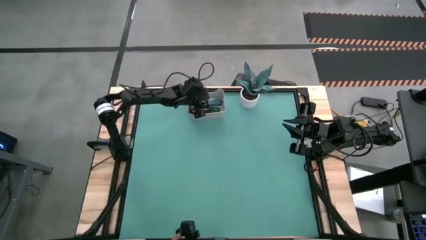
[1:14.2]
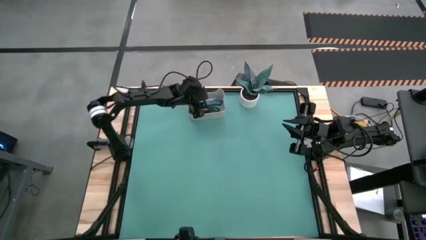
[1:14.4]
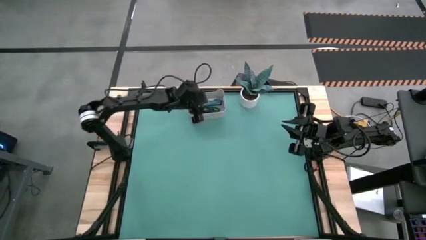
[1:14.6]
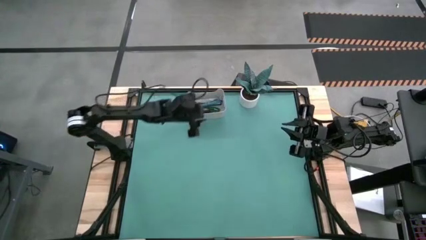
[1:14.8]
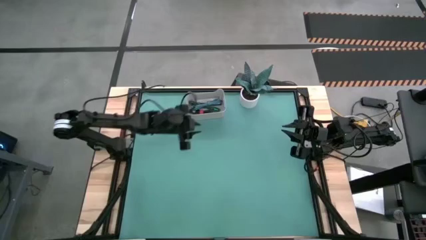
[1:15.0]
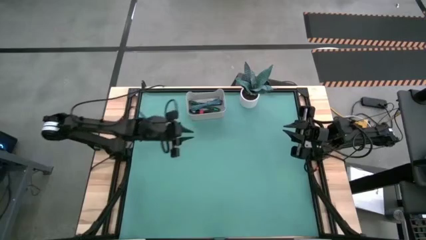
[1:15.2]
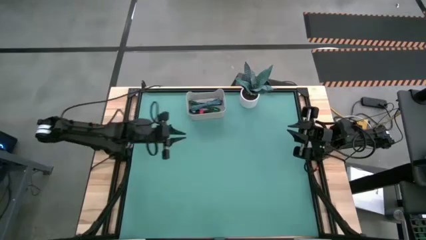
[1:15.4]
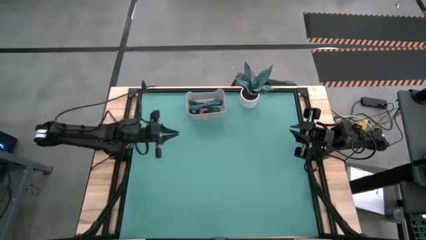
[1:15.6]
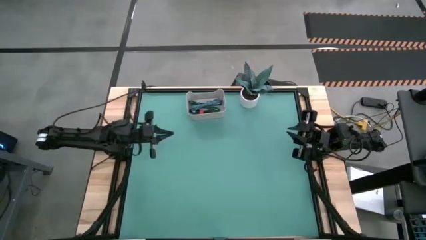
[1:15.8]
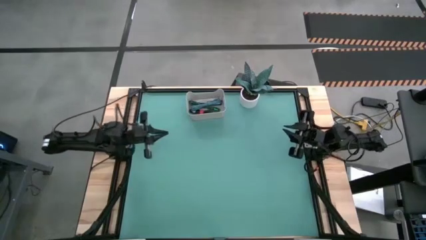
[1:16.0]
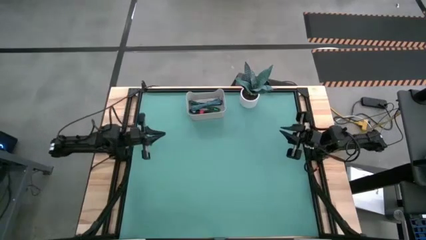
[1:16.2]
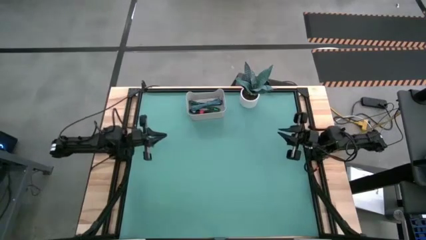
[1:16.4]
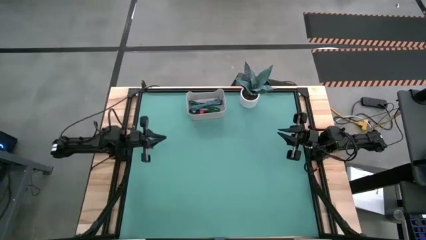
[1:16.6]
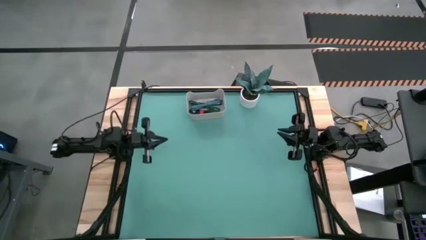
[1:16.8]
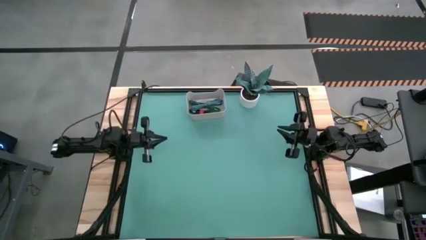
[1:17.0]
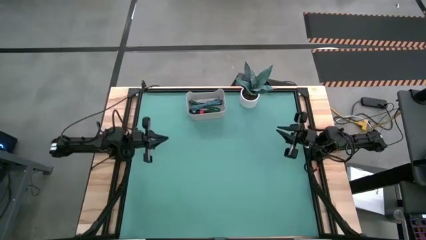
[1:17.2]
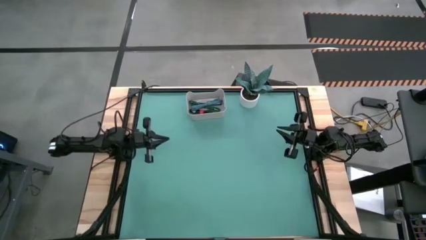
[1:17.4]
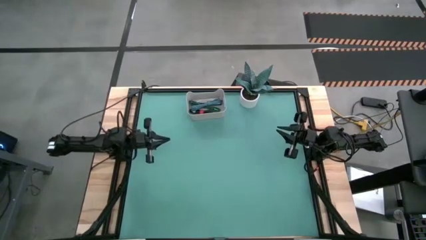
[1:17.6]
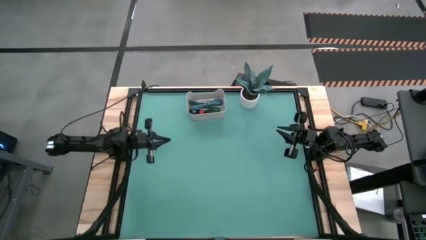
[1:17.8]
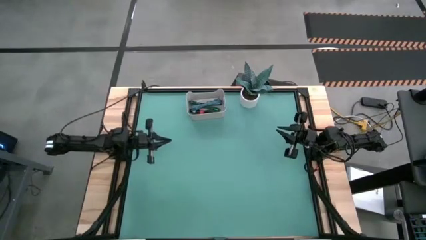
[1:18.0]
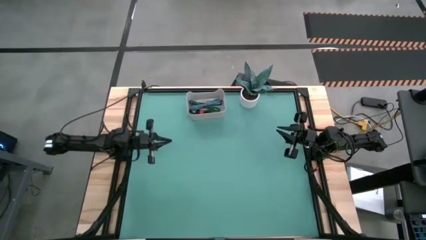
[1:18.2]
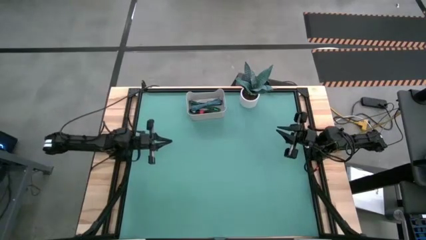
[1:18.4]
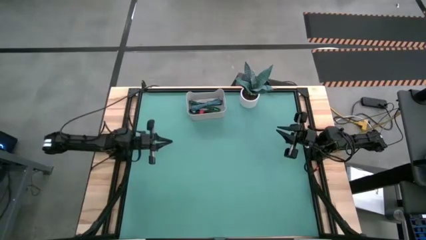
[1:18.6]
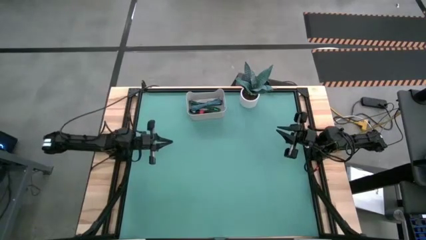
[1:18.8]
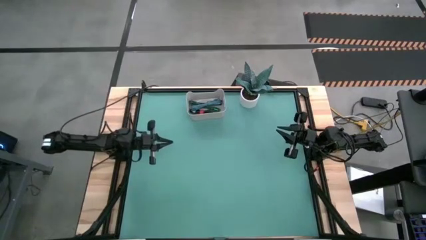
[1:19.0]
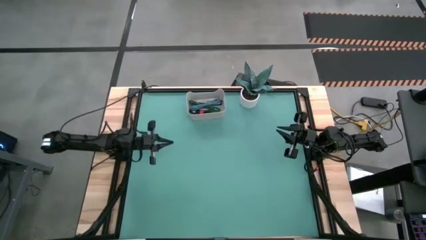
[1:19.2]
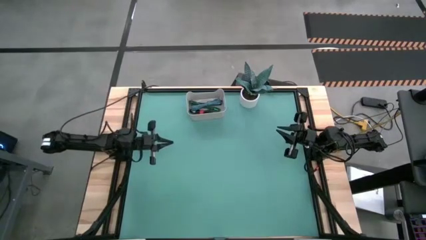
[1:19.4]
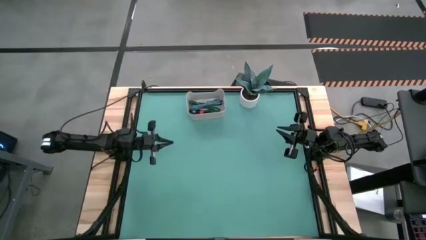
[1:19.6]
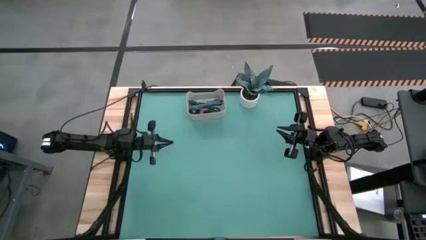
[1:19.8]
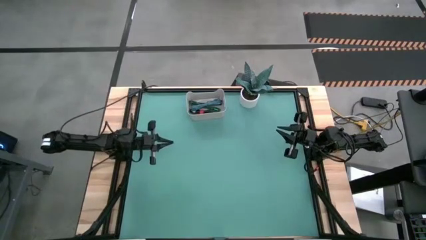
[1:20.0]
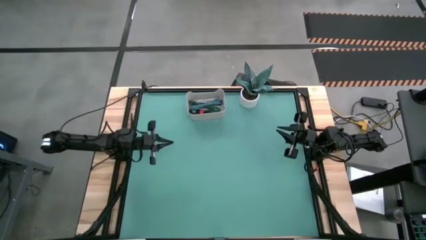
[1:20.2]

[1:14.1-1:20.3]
Task: Pick and place USB-C Cables
Return to Home Position

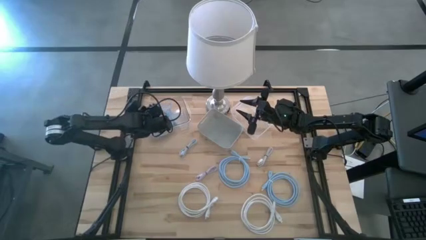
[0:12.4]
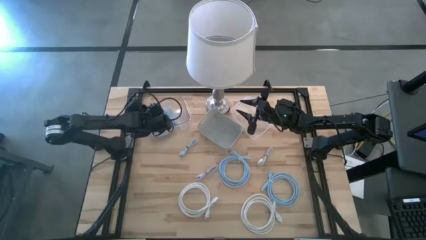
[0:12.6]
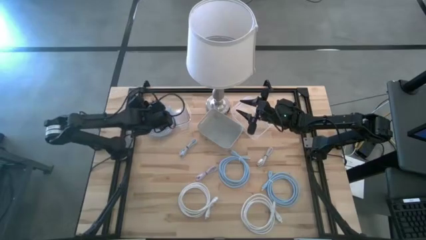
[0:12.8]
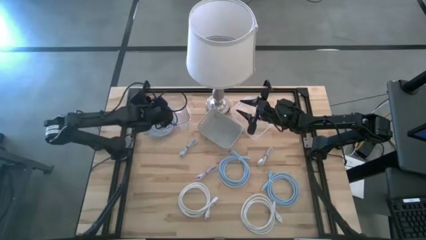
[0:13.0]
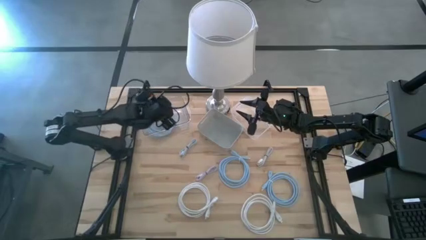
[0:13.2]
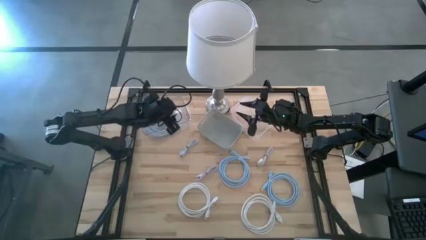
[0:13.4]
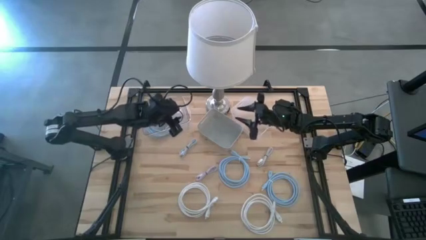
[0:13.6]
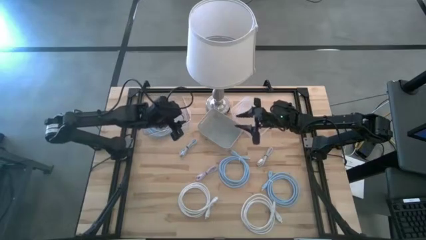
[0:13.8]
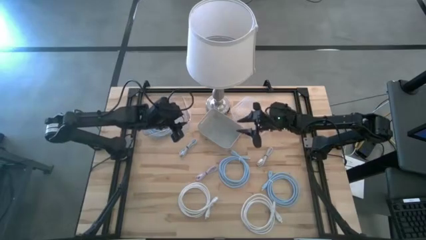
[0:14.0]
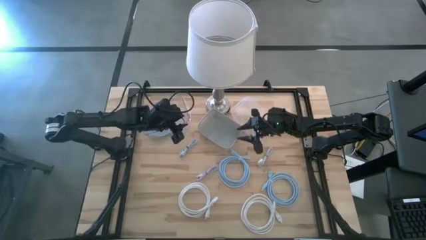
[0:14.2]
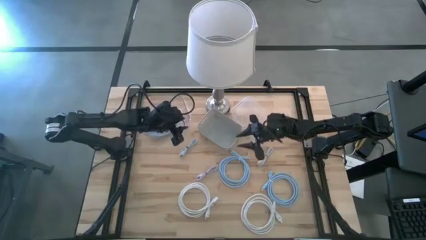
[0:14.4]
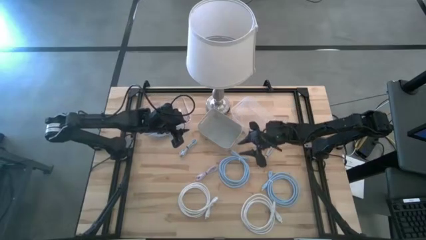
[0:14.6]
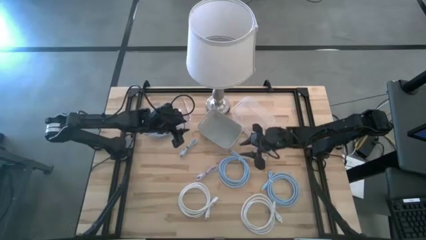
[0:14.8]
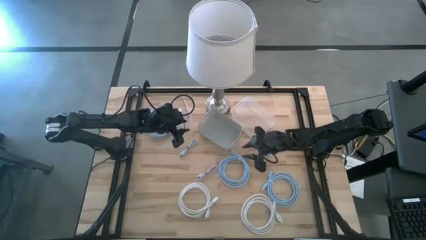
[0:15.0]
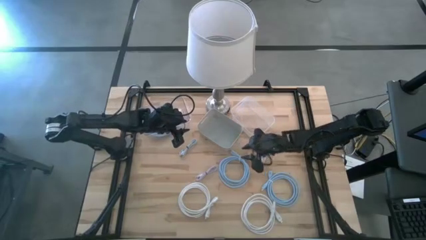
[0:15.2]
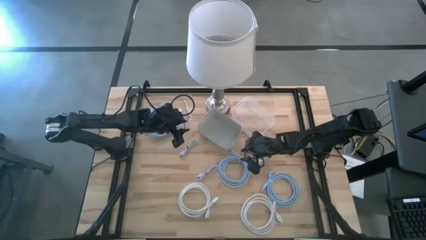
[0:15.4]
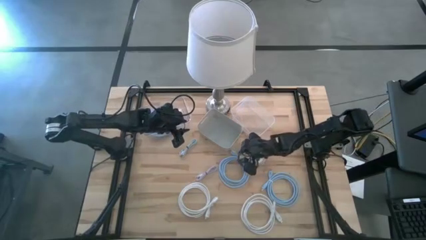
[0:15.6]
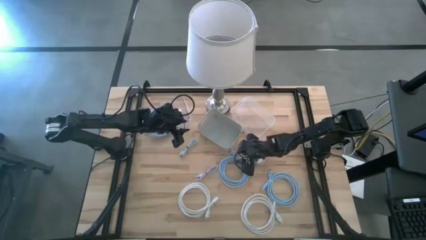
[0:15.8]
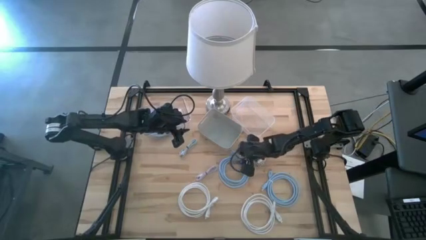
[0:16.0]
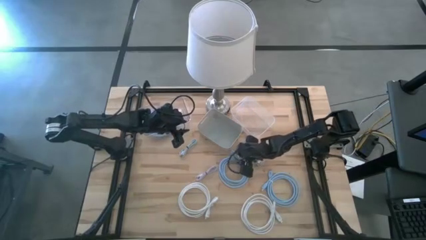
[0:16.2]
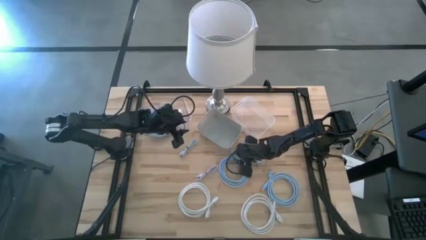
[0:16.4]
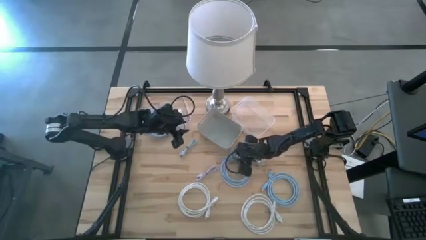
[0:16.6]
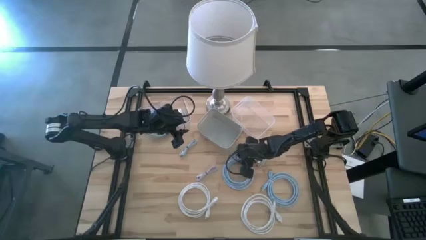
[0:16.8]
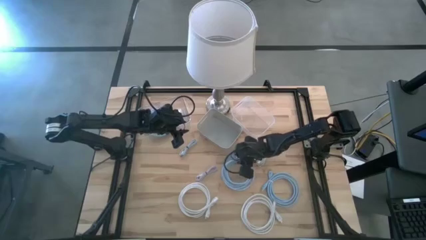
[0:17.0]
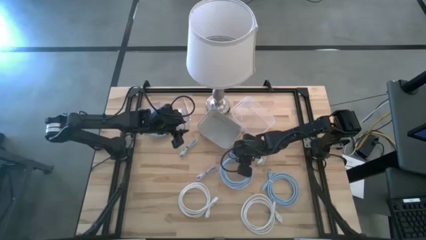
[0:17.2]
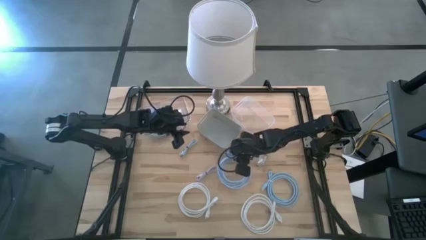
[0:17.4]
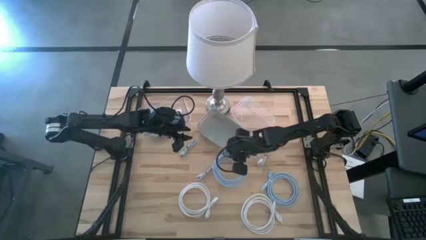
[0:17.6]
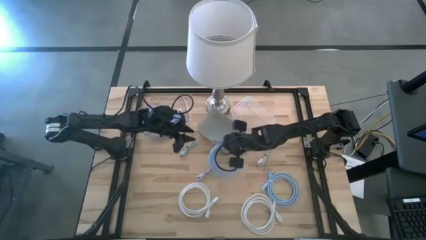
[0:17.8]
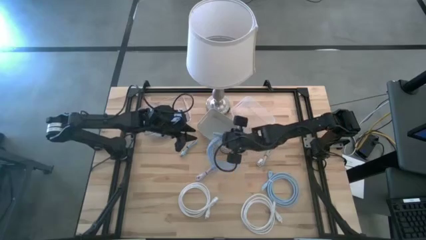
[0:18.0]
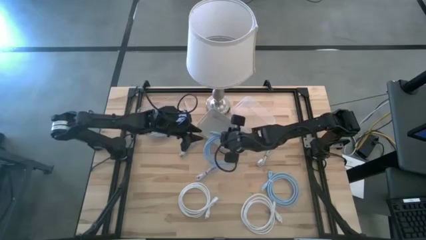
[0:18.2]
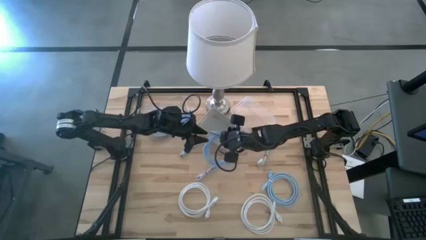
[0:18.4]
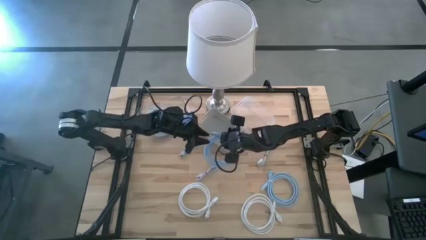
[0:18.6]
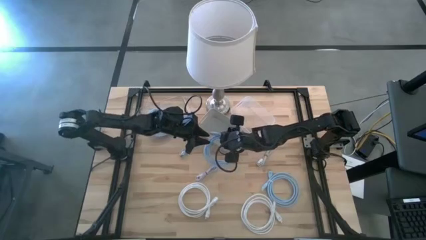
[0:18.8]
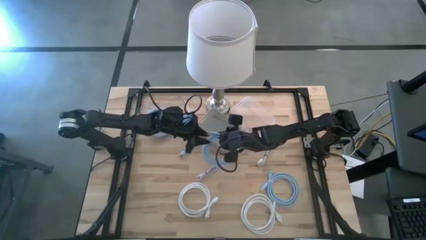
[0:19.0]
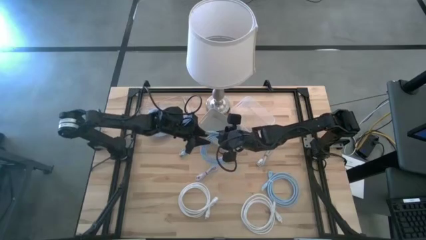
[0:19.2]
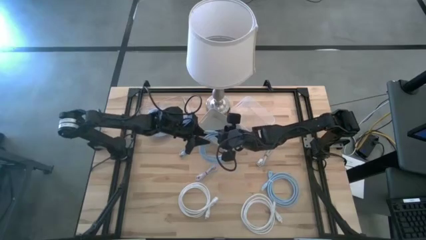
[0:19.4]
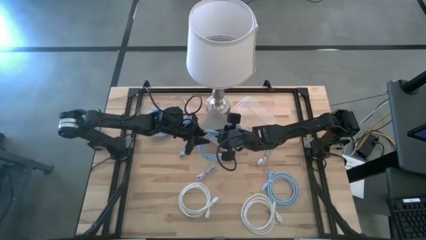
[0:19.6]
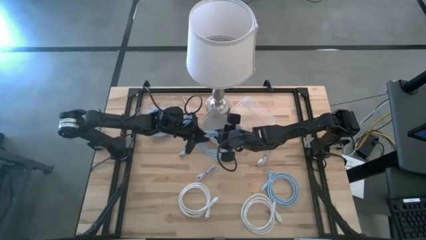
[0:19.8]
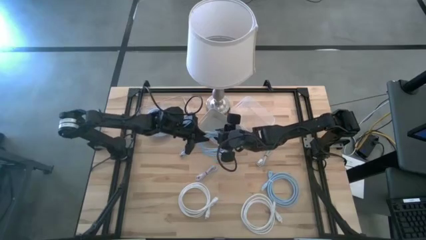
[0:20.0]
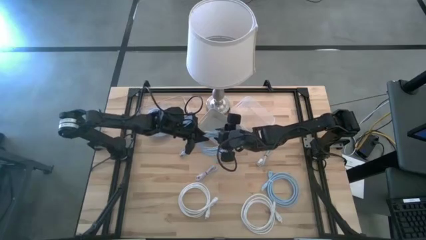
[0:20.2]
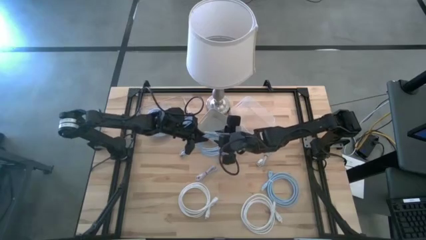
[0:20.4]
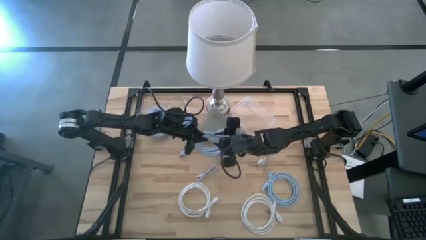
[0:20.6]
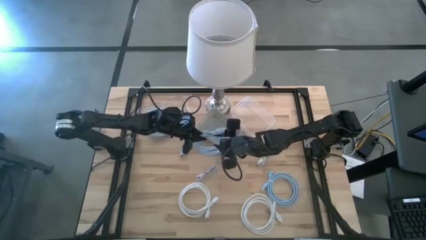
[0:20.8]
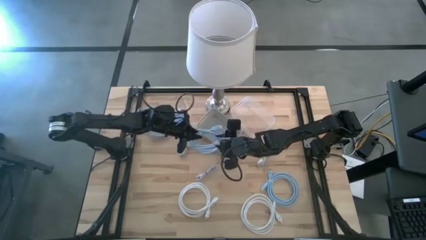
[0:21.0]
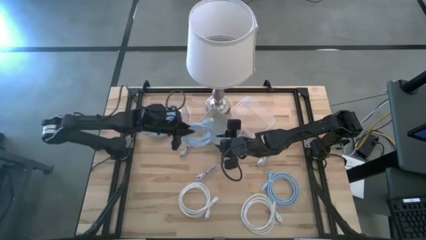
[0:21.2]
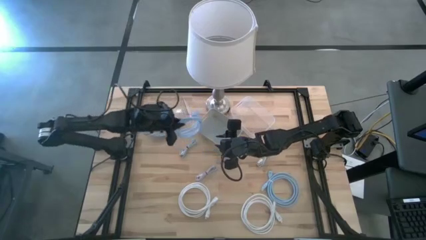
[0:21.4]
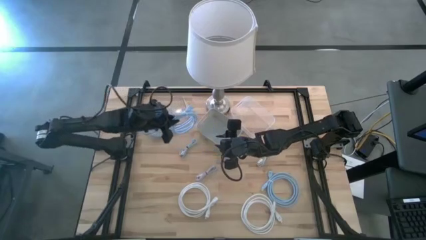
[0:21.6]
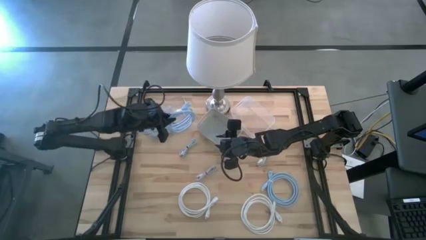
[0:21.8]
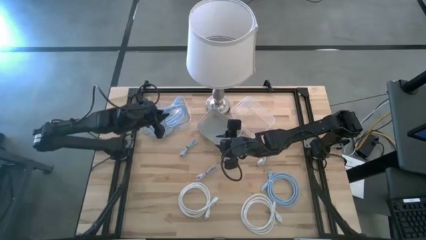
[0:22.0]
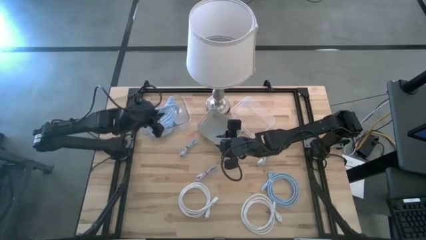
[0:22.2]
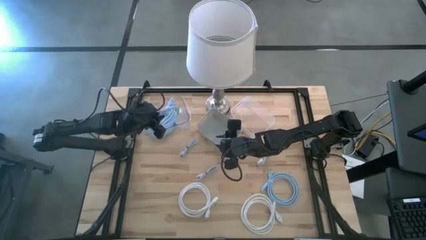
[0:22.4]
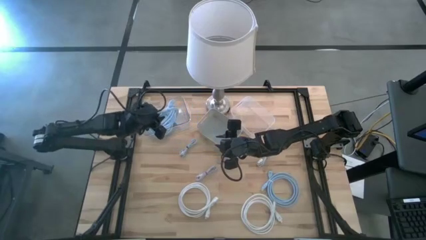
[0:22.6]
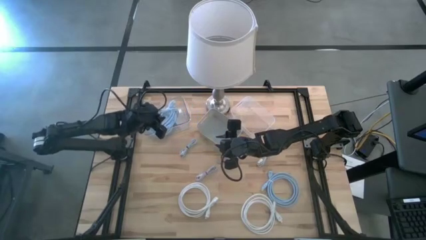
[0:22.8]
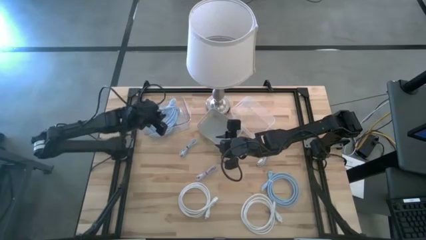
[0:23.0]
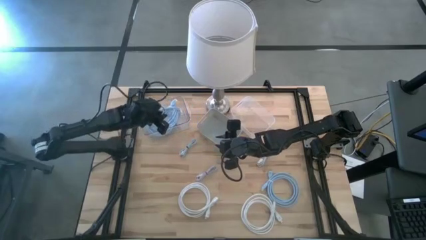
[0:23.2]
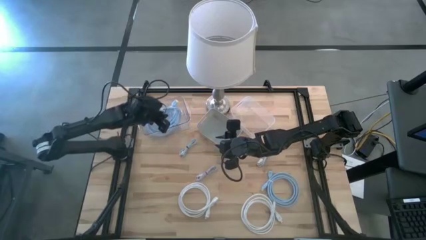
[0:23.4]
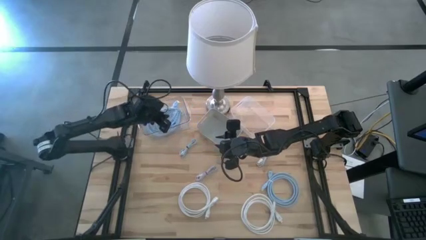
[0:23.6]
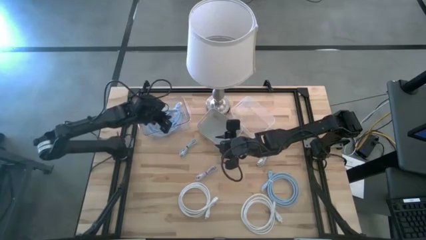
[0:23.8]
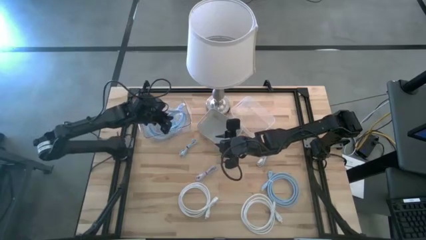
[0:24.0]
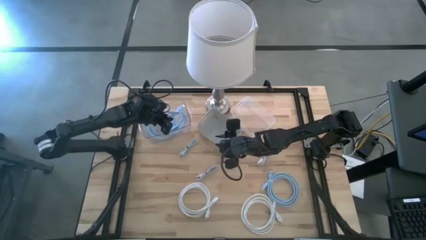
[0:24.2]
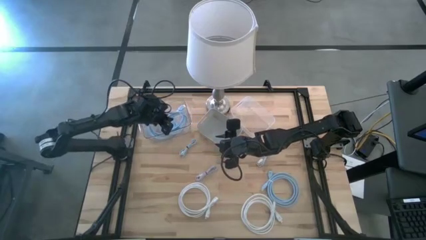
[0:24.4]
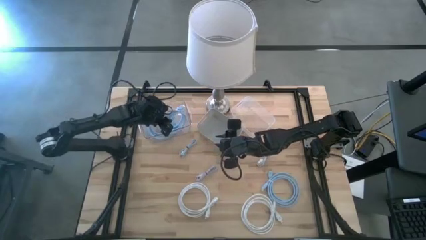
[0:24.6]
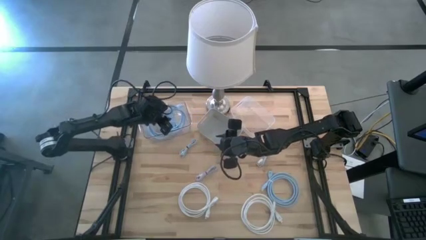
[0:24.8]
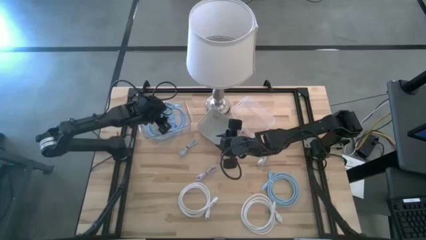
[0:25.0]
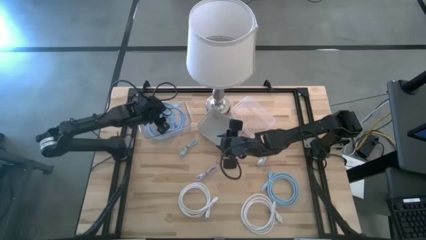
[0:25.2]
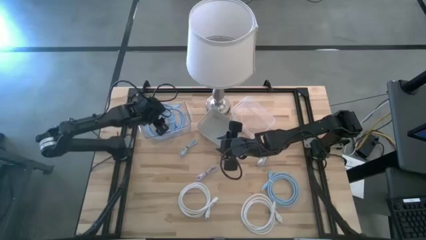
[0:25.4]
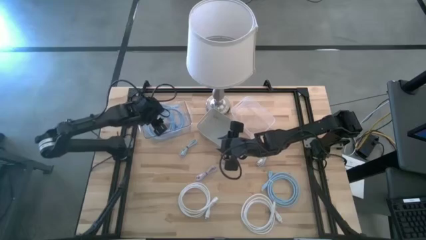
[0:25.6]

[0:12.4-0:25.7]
Task: Pick & Place USB Port
Put the left blue HDMI cable into the left transparent bin
